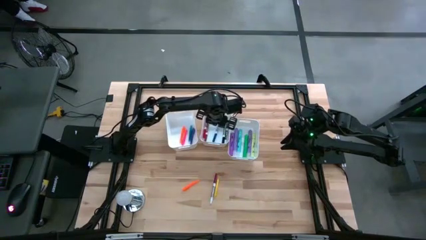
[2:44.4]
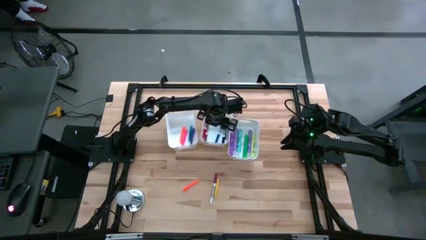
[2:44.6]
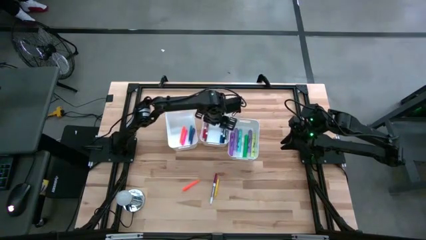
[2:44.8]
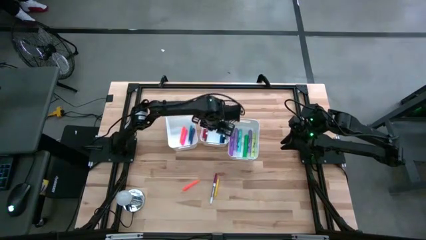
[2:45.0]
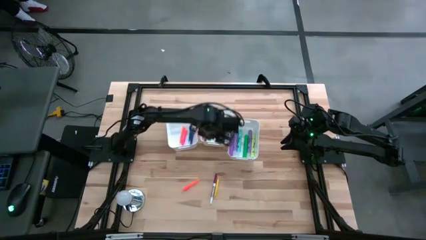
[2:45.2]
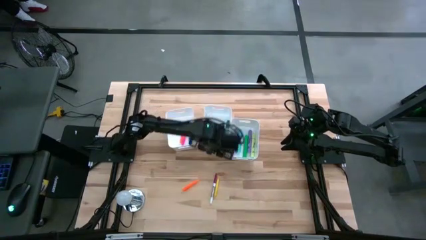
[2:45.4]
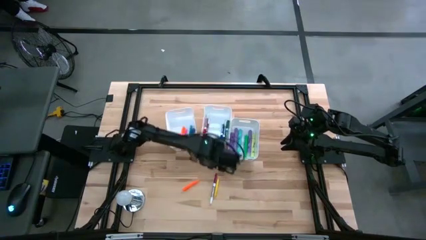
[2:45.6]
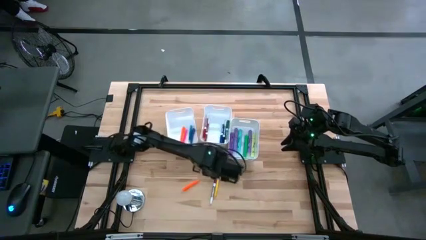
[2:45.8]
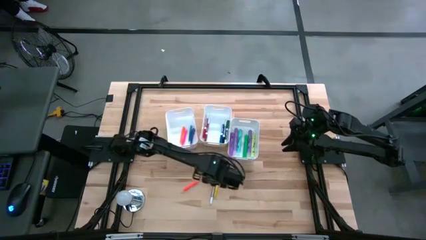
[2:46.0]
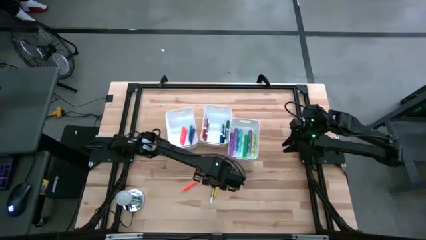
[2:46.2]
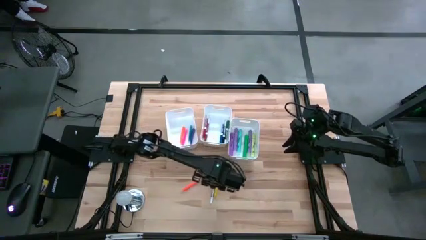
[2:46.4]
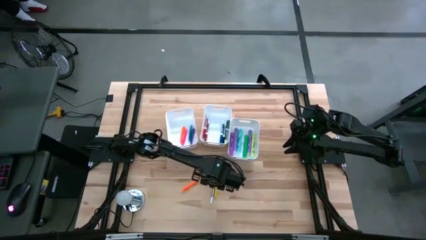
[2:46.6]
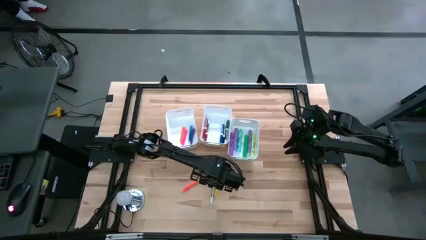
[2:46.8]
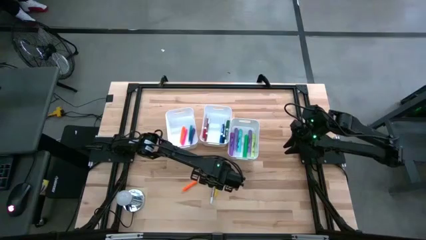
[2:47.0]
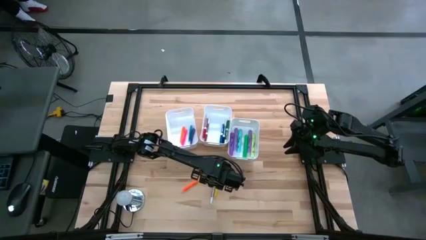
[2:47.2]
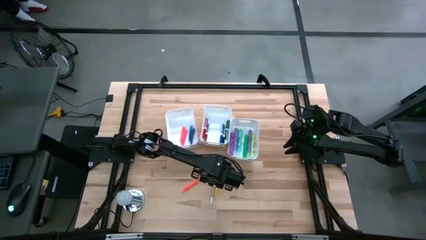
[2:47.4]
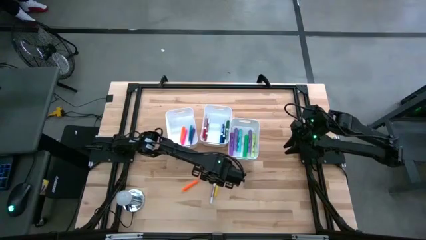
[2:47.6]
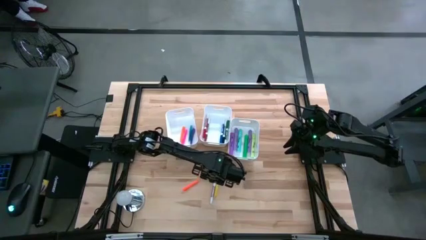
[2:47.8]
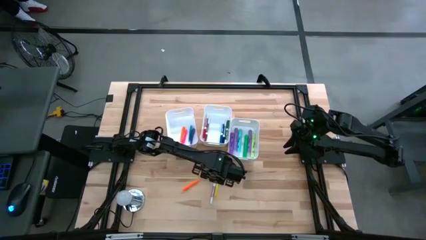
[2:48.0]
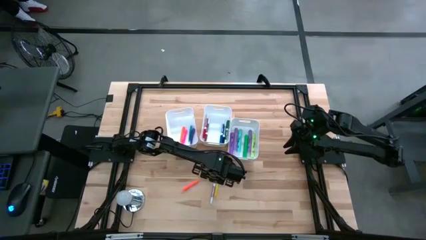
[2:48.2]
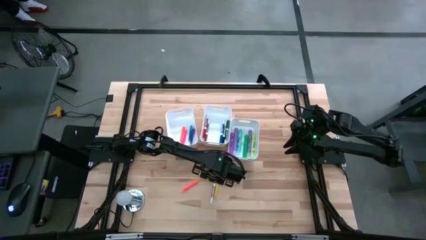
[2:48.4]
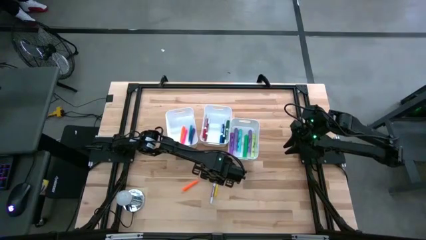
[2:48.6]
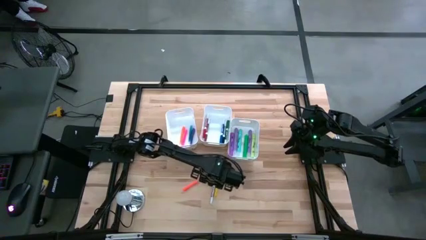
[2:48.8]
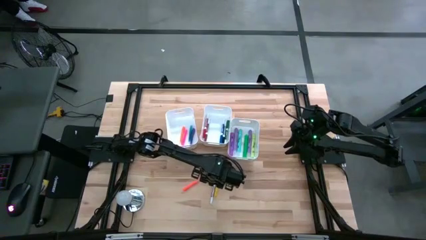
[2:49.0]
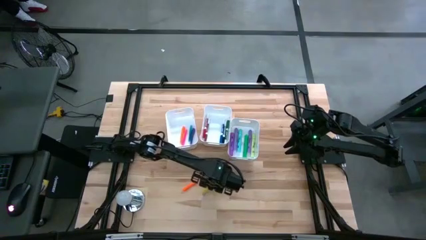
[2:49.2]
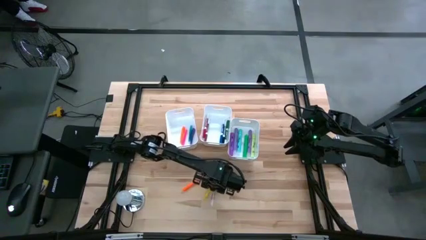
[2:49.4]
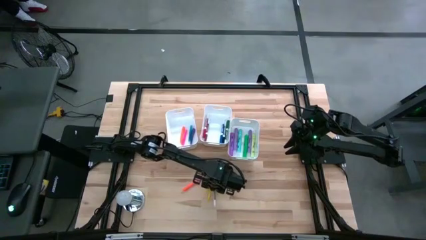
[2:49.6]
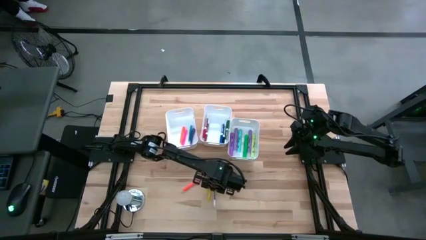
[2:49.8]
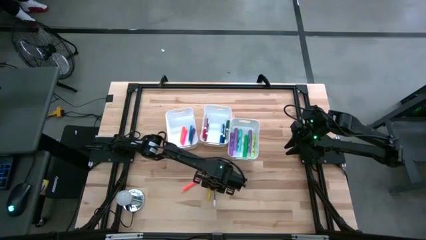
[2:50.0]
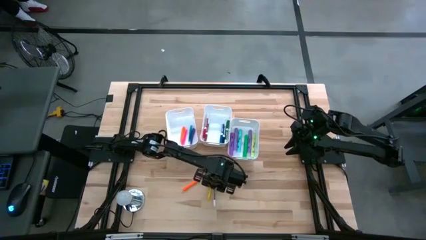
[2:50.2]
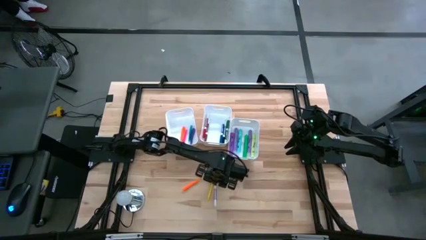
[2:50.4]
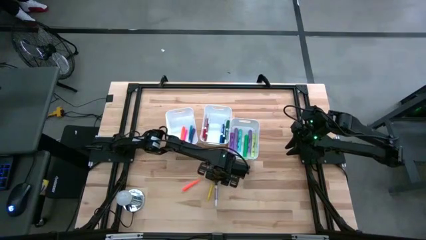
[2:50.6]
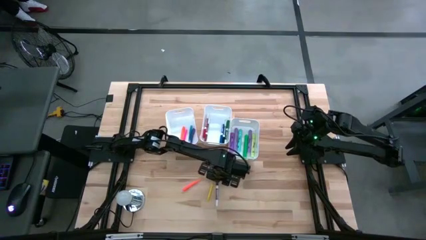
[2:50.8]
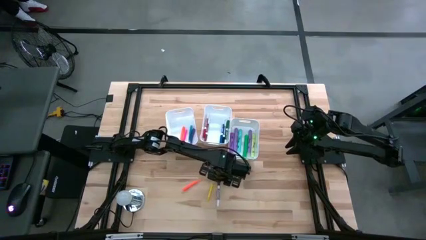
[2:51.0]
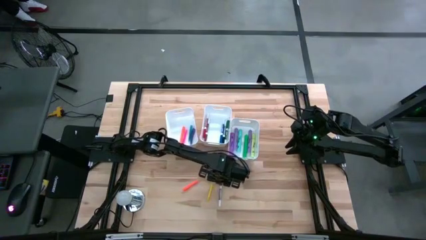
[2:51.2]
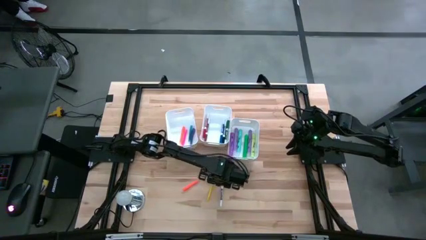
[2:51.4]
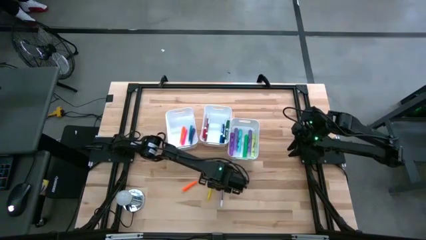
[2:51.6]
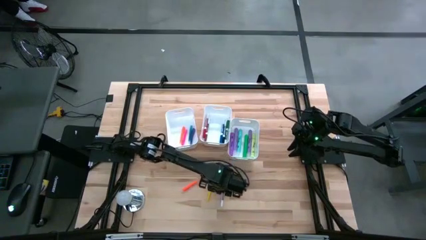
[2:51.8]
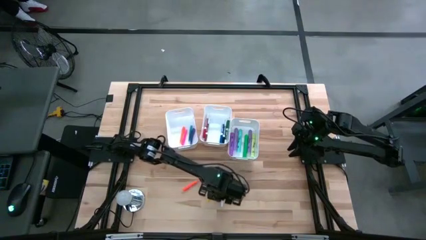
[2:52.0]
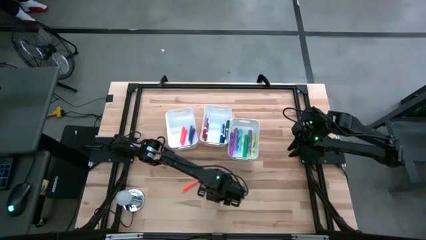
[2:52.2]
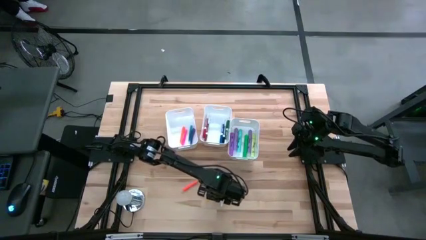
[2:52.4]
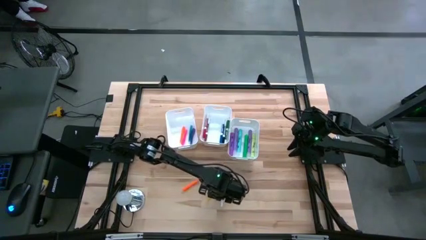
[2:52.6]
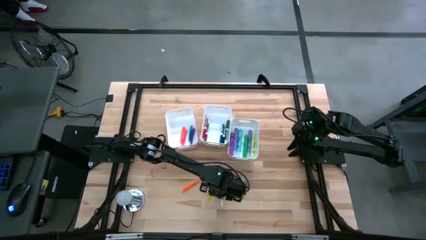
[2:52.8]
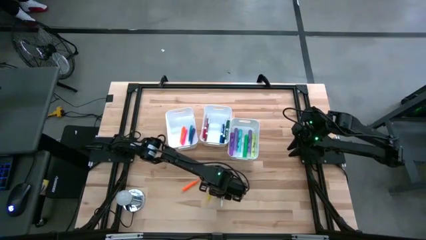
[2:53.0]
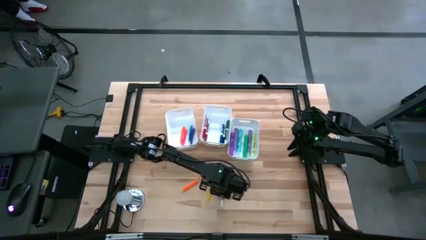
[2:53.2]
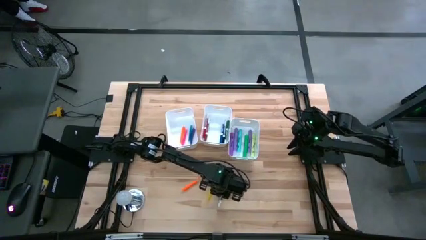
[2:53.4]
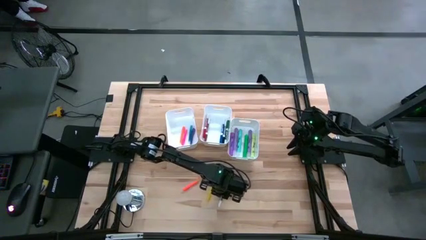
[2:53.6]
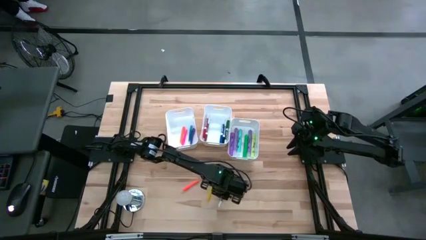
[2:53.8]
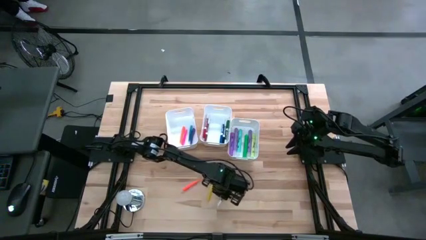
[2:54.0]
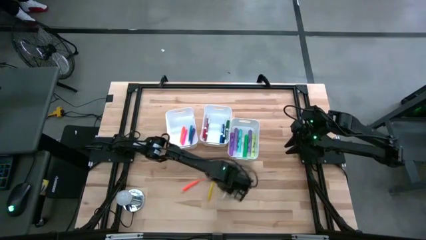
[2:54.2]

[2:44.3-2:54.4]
Task: Pick & Place Markers
Put the violet marker into the middle white bin

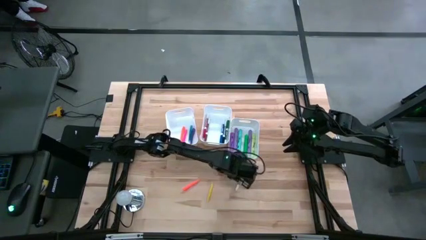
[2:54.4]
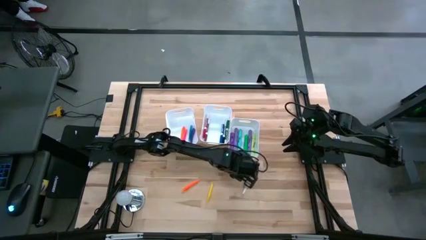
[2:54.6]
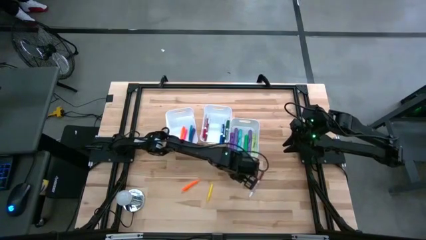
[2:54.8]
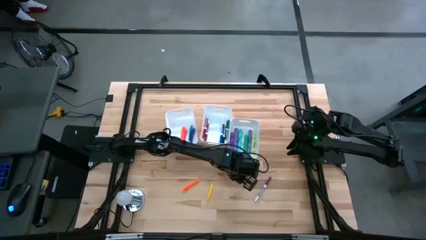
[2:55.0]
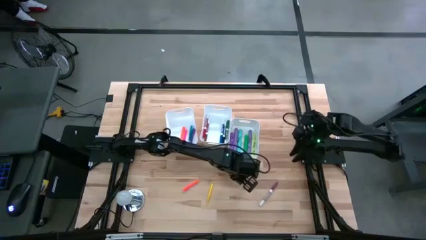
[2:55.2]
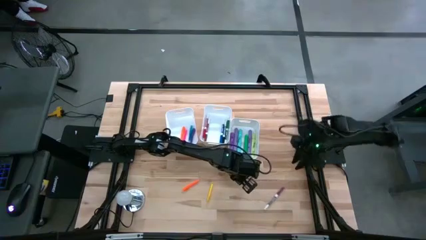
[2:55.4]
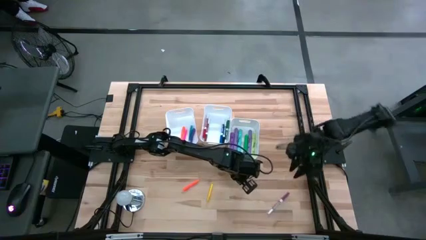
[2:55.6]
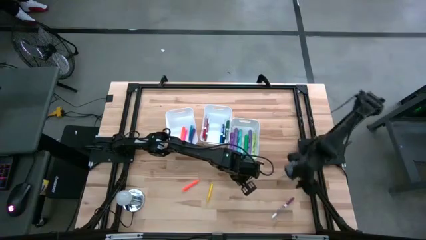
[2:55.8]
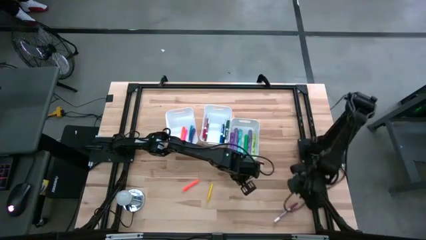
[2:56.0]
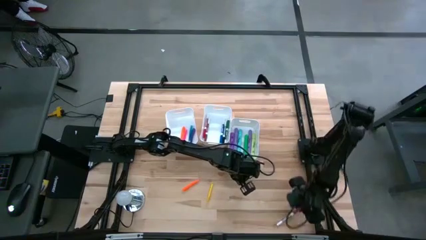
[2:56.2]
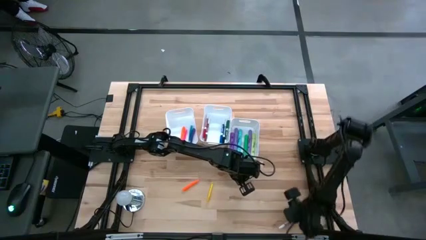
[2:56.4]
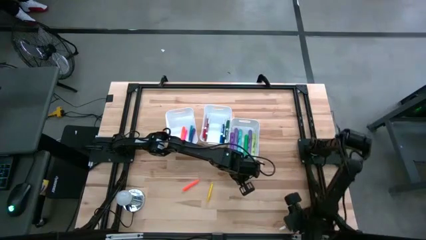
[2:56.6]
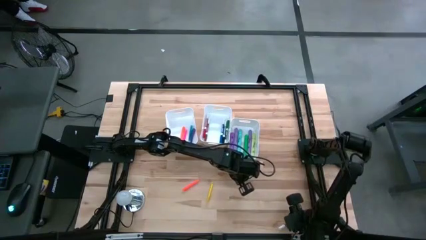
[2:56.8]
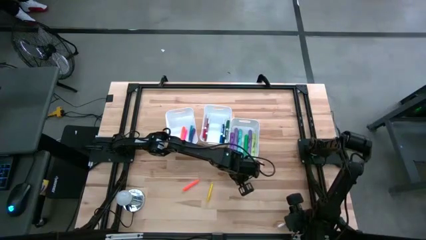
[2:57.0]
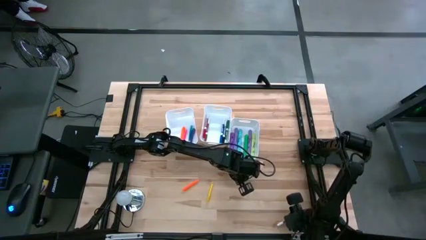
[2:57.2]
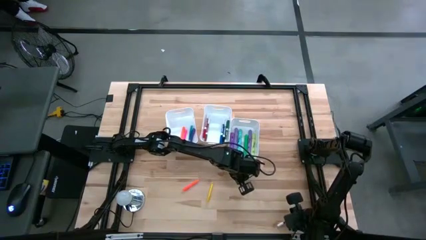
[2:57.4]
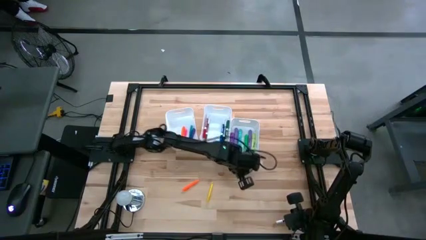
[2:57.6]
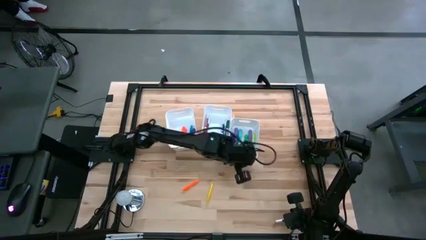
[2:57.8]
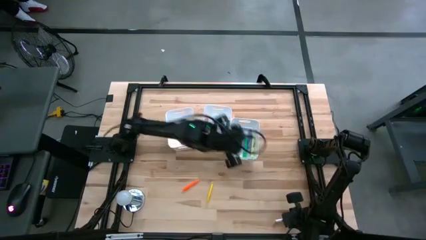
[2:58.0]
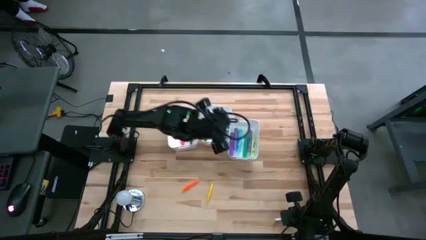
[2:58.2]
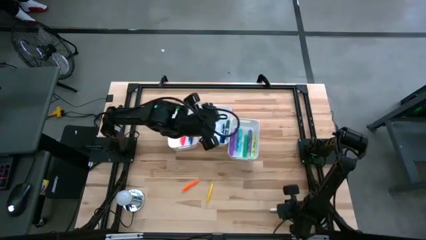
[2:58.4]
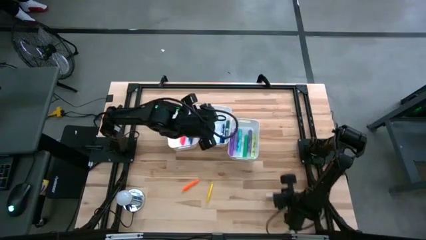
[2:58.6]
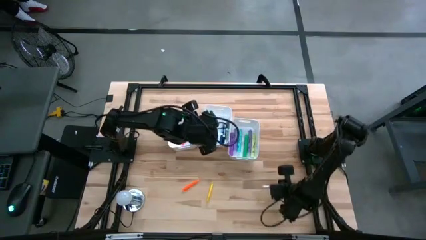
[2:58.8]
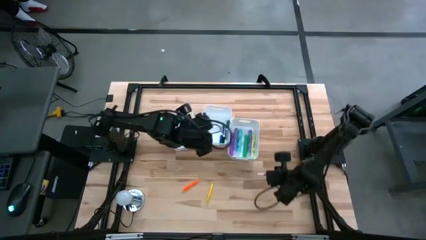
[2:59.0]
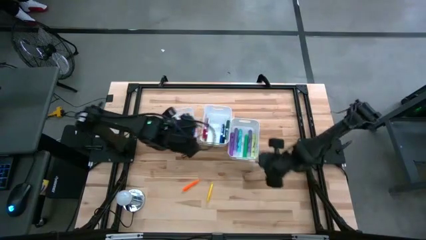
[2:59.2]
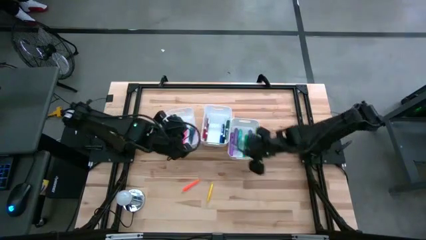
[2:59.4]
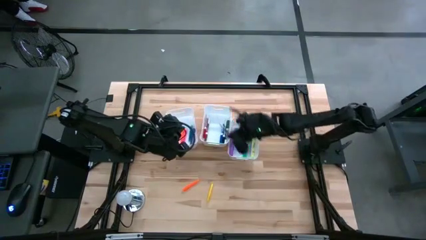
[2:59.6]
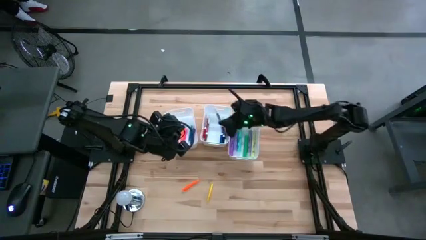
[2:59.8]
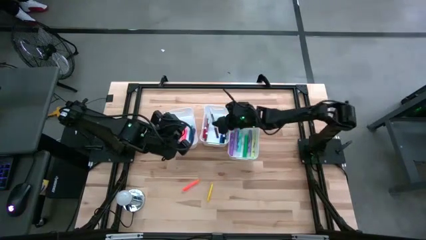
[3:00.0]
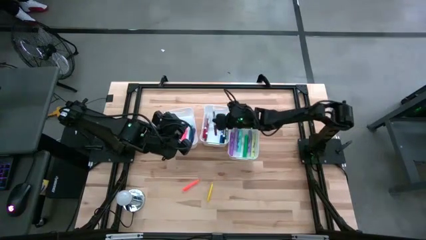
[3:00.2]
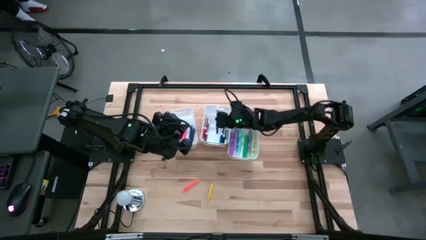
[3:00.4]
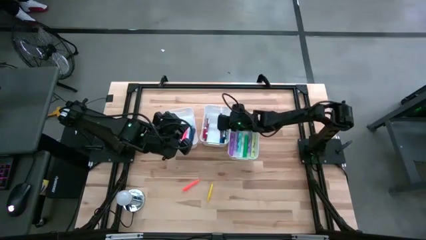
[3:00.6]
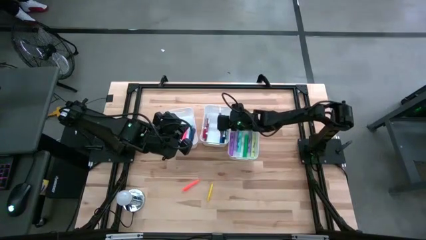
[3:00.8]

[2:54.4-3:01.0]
Put the violet marker into the middle white bin
